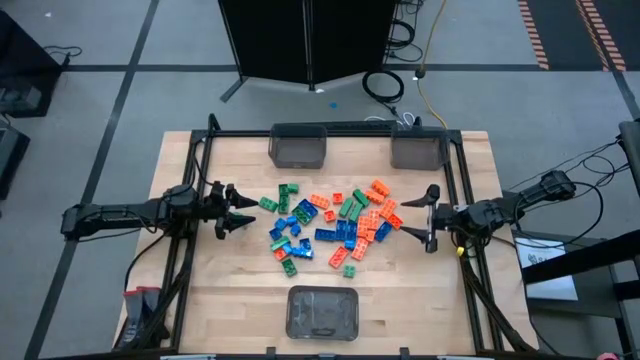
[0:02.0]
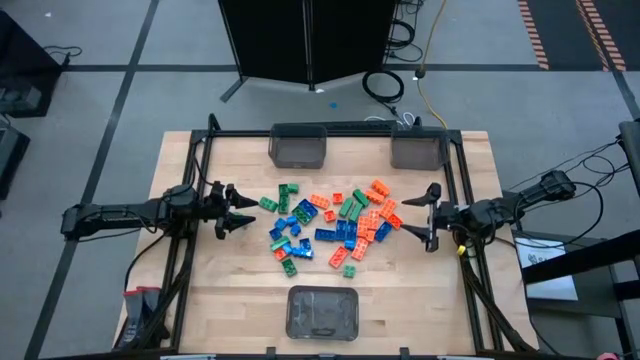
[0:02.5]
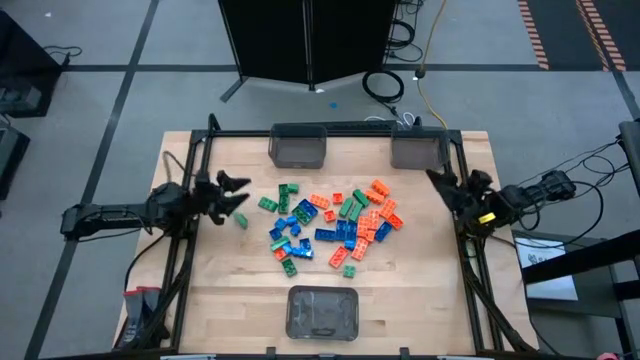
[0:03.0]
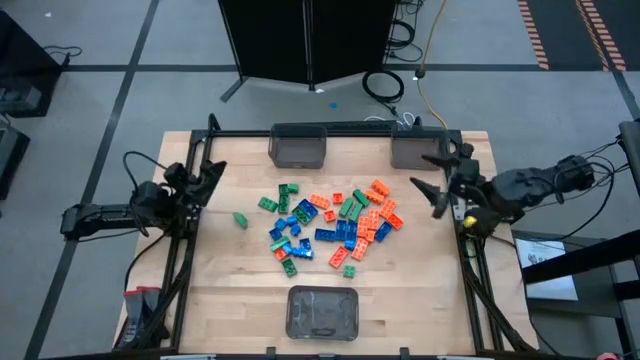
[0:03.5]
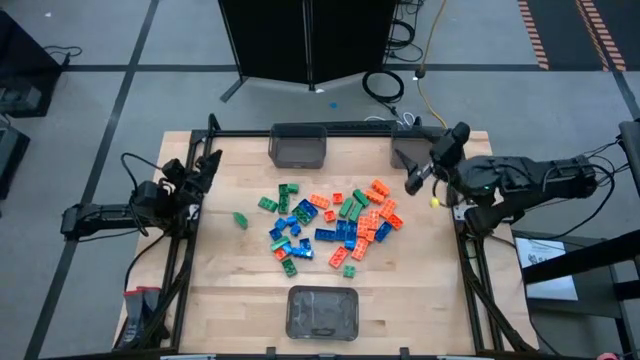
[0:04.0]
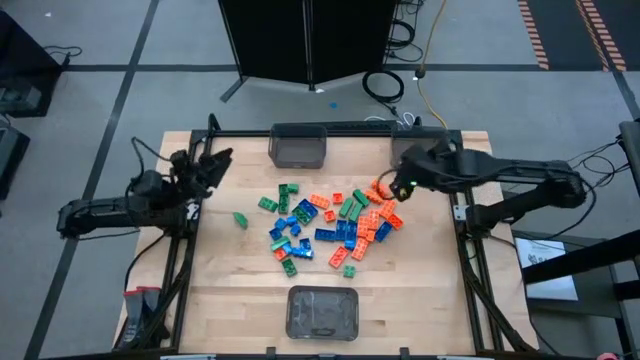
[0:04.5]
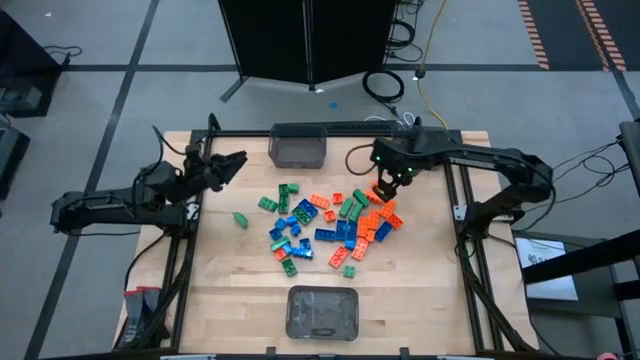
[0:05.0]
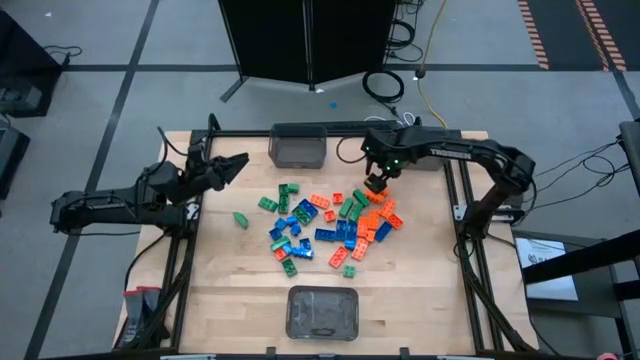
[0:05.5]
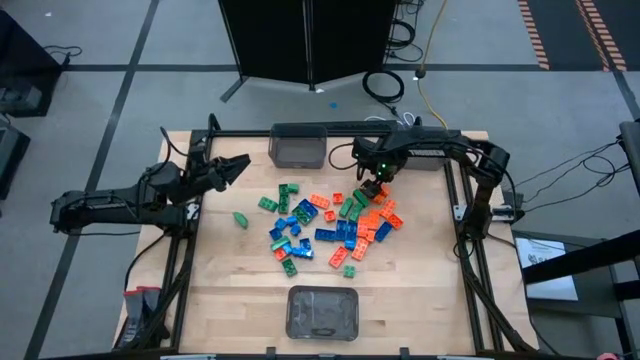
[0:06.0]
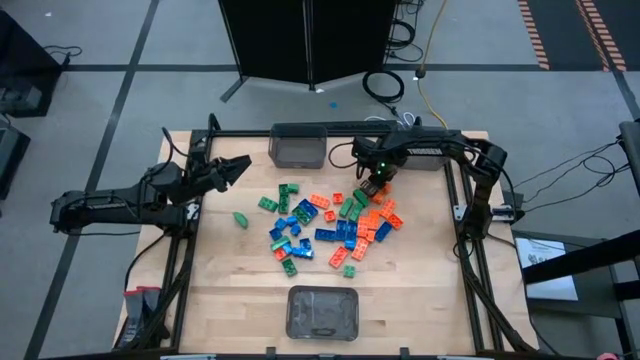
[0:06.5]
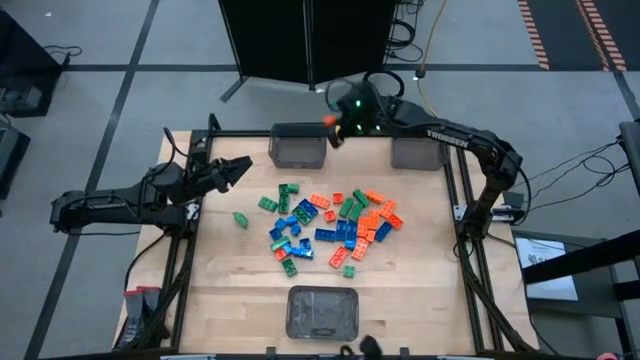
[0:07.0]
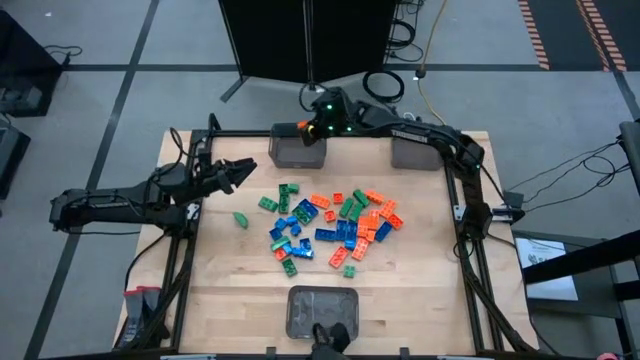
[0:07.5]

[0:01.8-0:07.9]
Task: Sort blocks
Put the orange game piece into the top left black bin

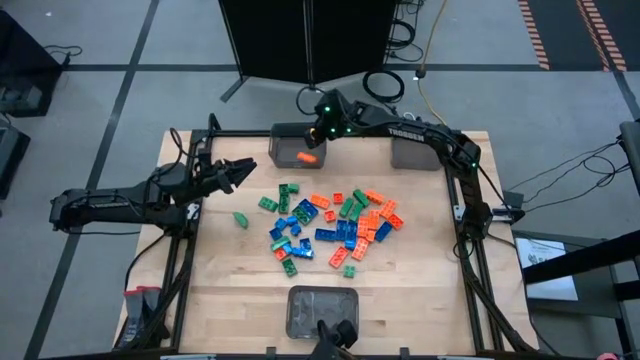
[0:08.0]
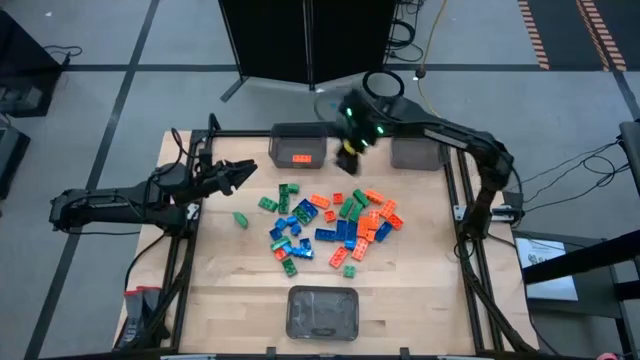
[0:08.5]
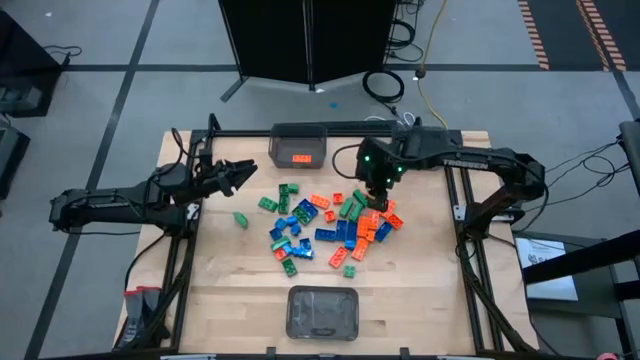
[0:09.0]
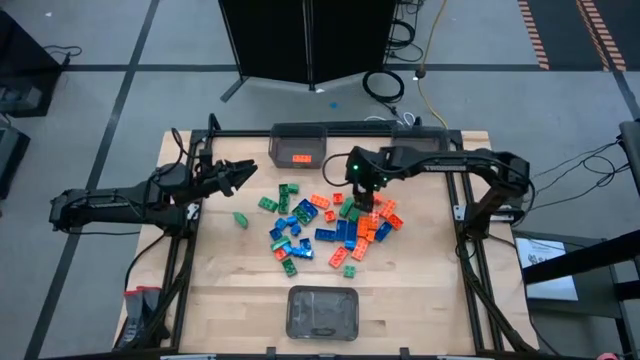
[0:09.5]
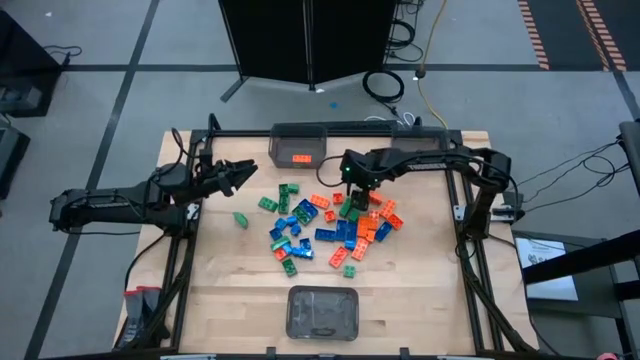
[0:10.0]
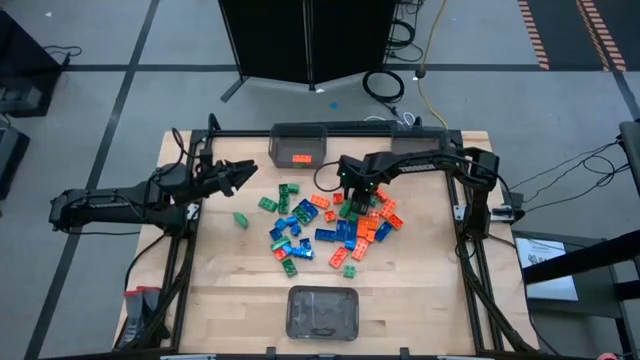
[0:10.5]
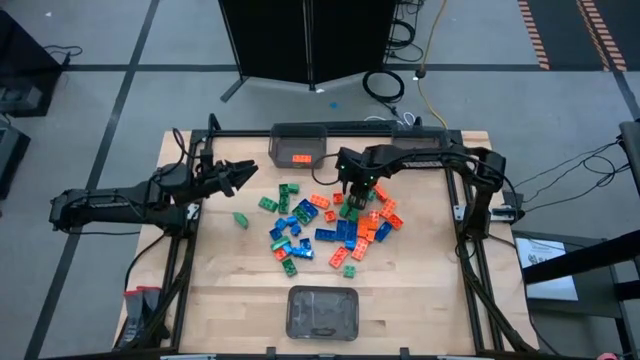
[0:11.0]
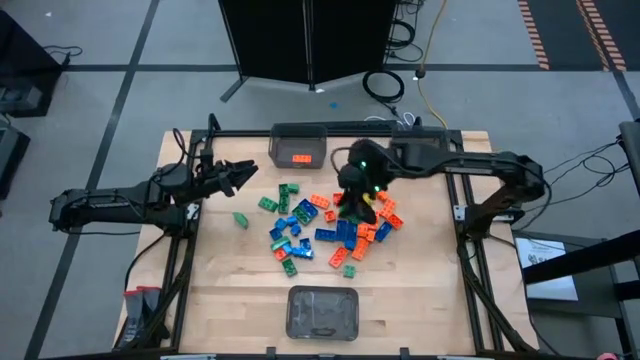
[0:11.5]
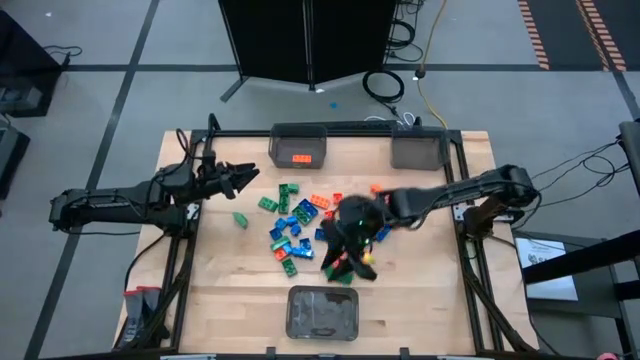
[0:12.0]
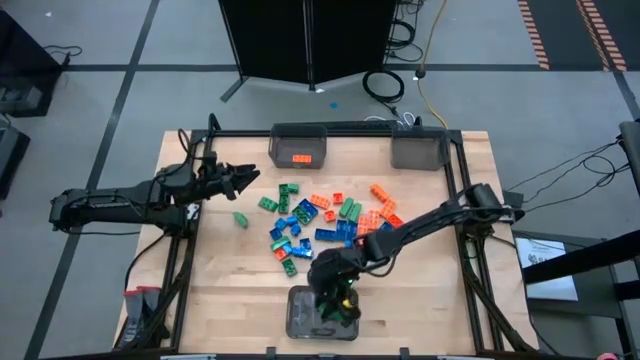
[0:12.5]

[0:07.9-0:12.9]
Put the green game piece into the bottom black bin

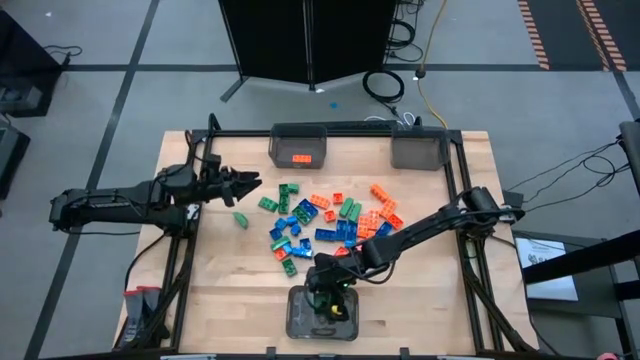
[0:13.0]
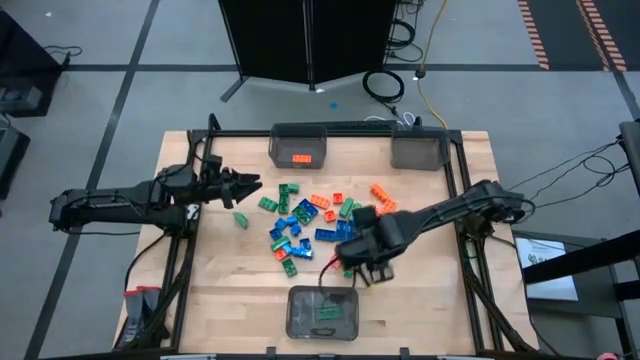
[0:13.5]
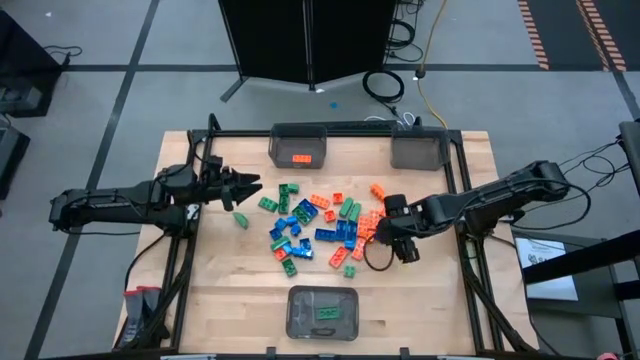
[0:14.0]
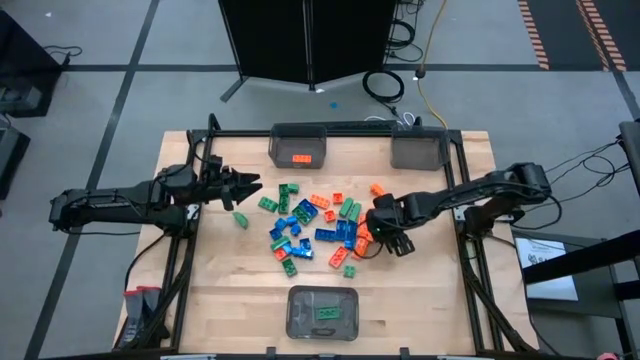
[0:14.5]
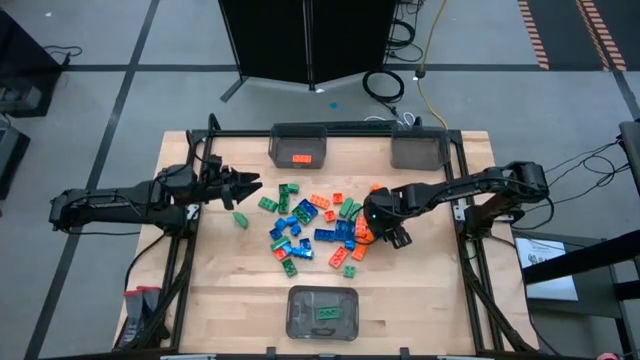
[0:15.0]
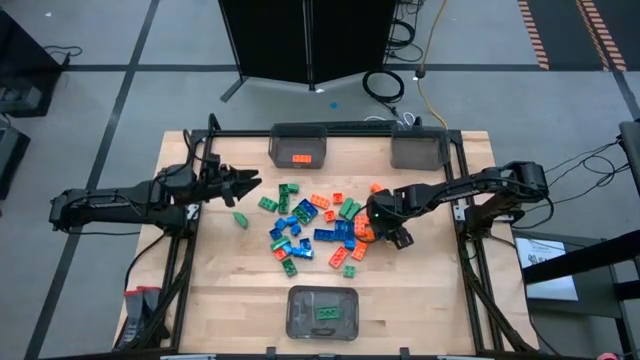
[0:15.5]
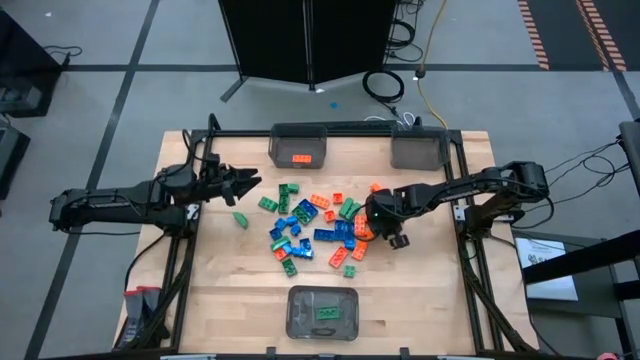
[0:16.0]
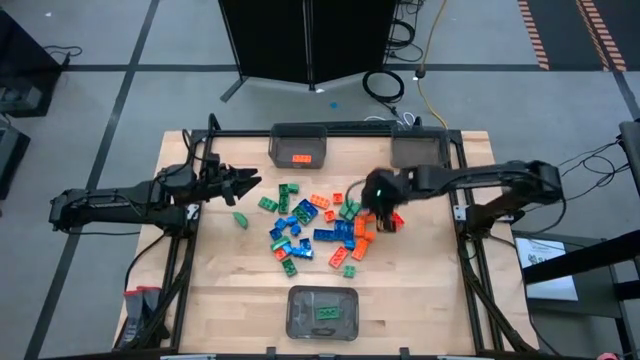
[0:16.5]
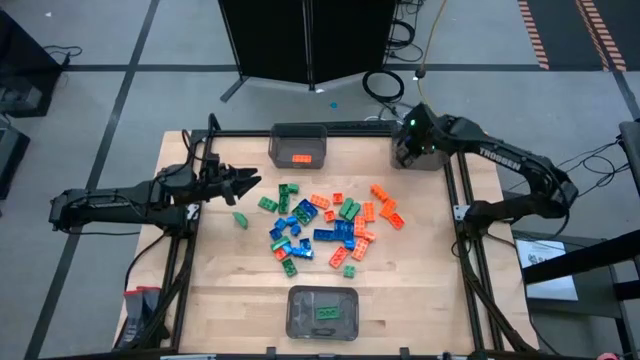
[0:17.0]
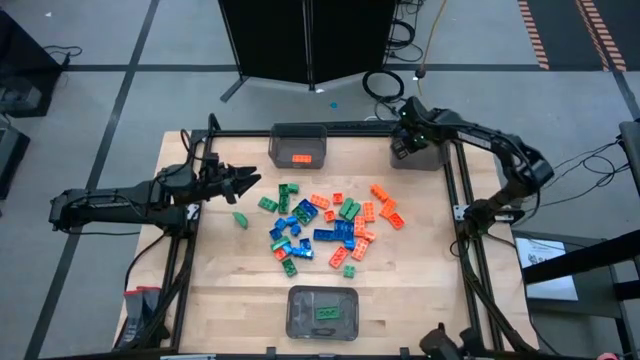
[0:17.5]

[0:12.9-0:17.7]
Put the blue game piece into the top right black bin

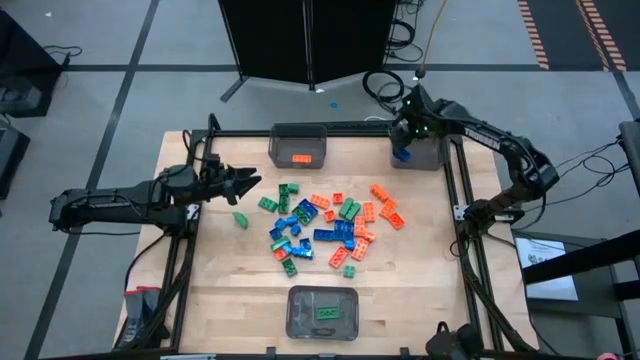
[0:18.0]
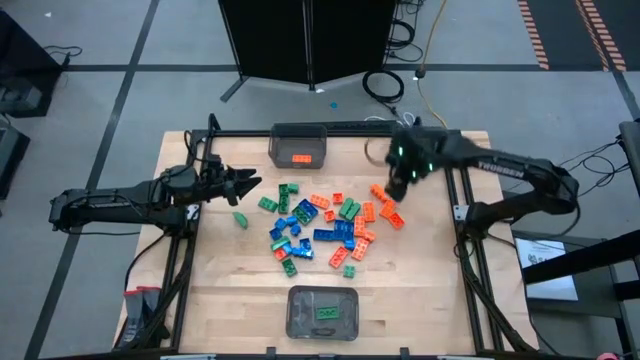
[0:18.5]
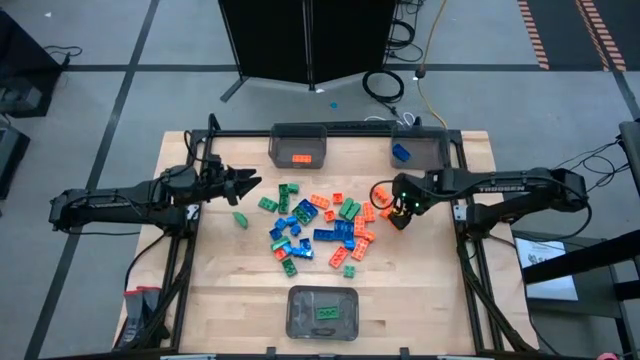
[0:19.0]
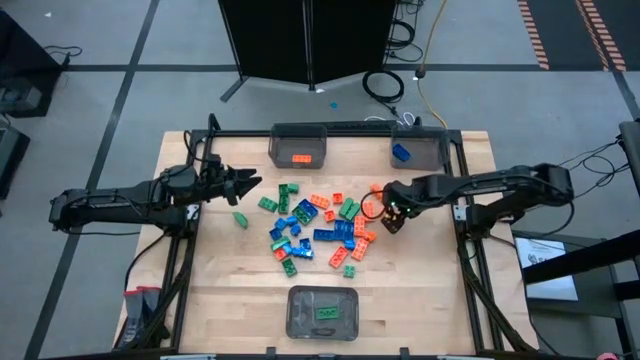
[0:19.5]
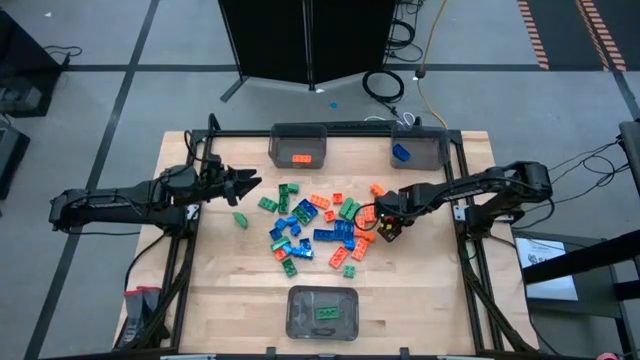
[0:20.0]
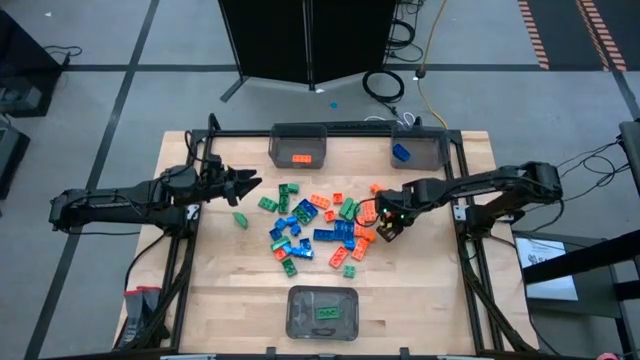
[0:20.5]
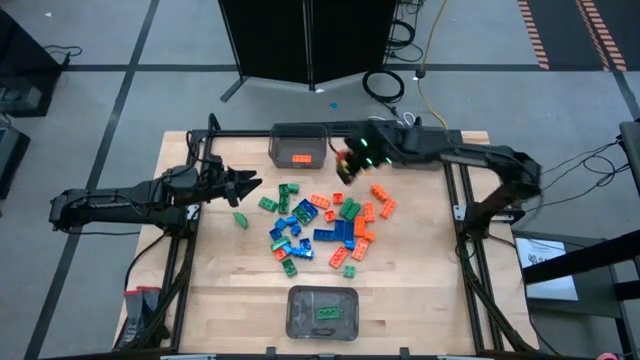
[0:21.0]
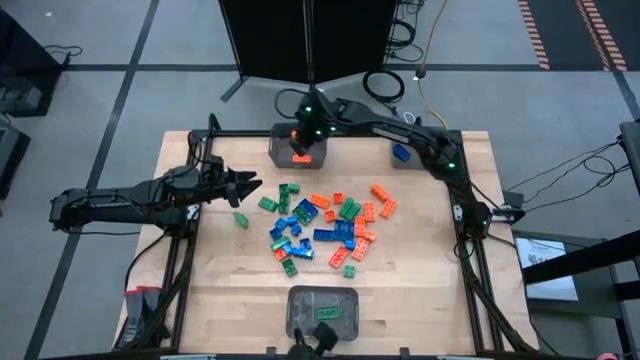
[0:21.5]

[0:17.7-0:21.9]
Put the orange game piece into the top left black bin
